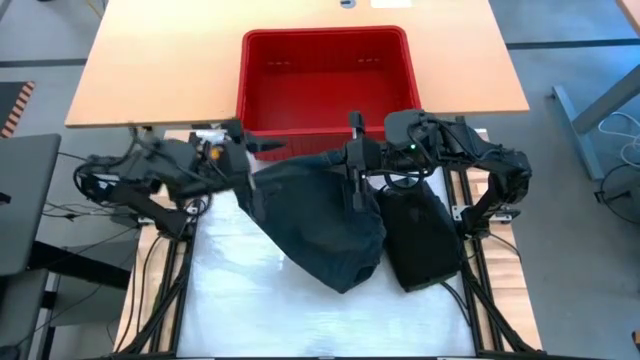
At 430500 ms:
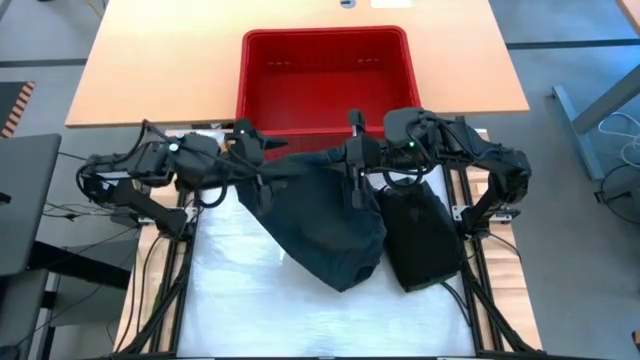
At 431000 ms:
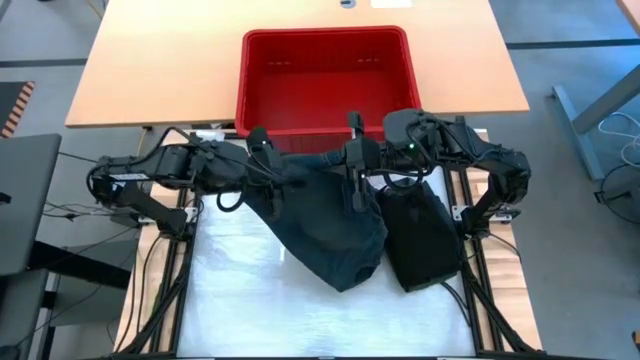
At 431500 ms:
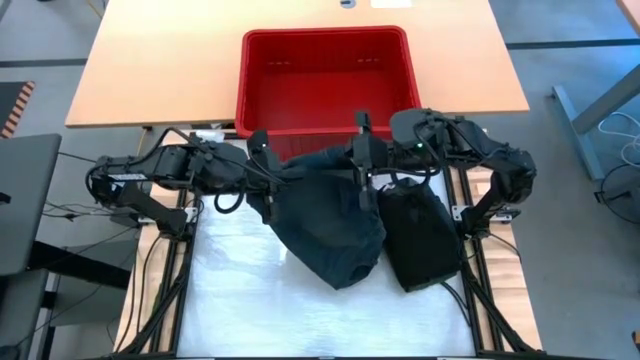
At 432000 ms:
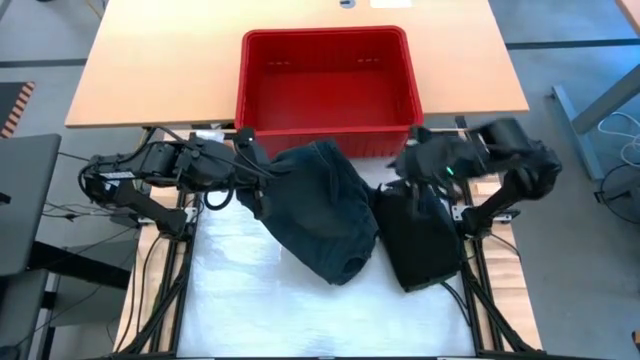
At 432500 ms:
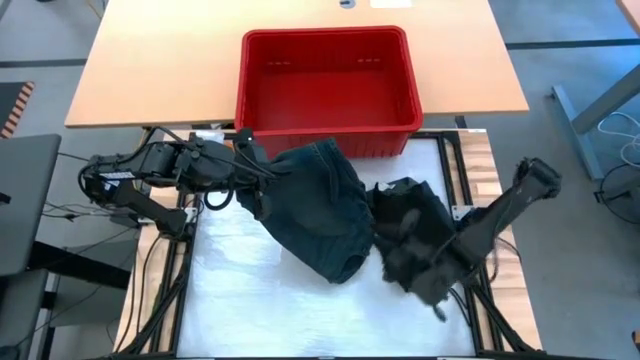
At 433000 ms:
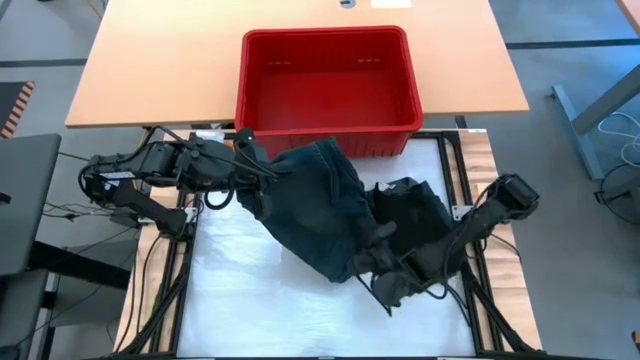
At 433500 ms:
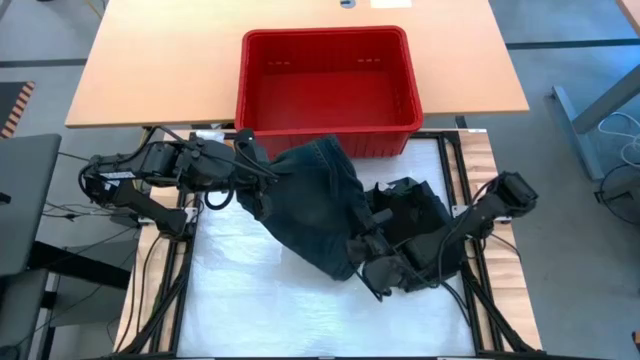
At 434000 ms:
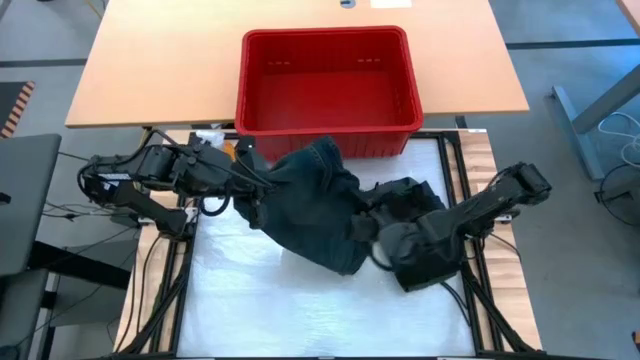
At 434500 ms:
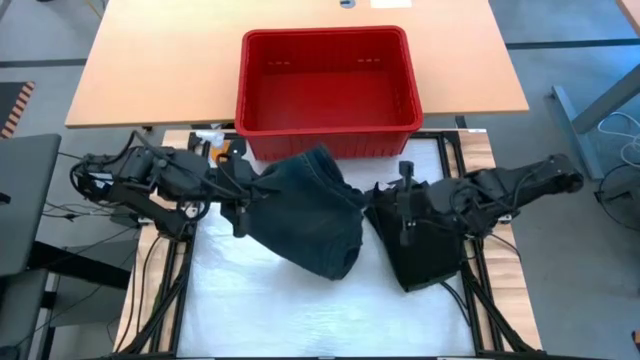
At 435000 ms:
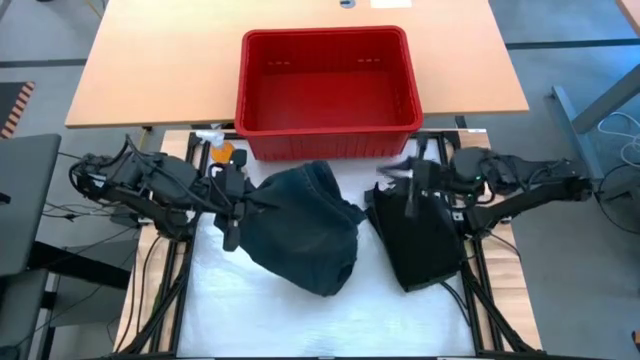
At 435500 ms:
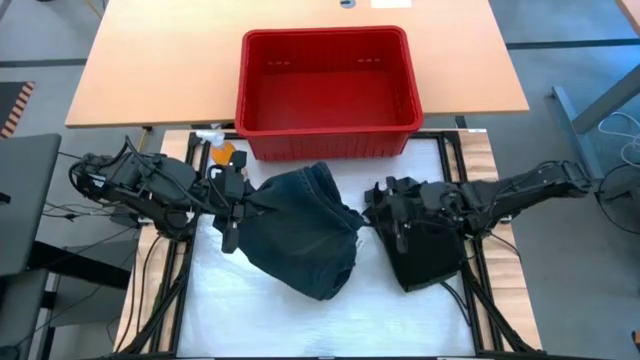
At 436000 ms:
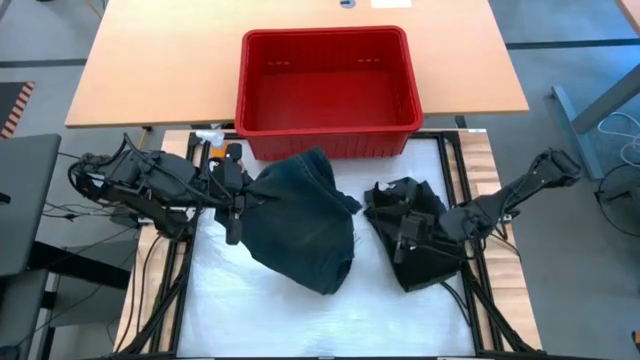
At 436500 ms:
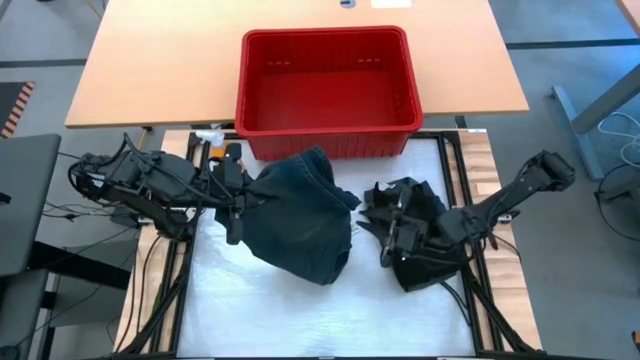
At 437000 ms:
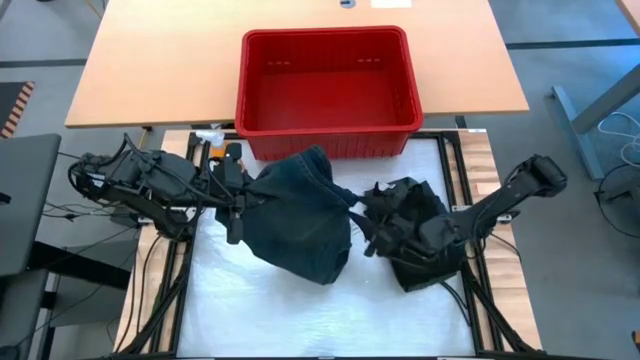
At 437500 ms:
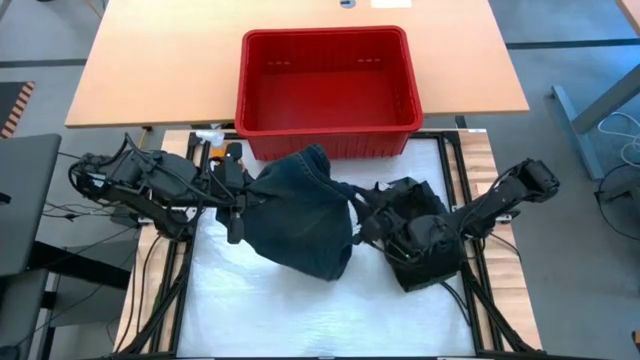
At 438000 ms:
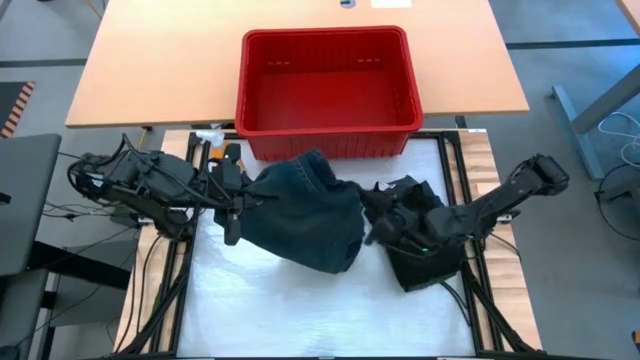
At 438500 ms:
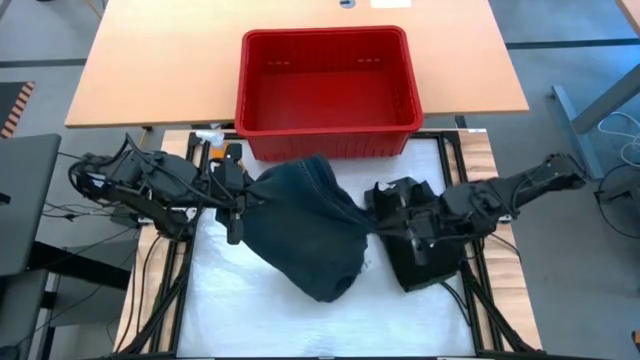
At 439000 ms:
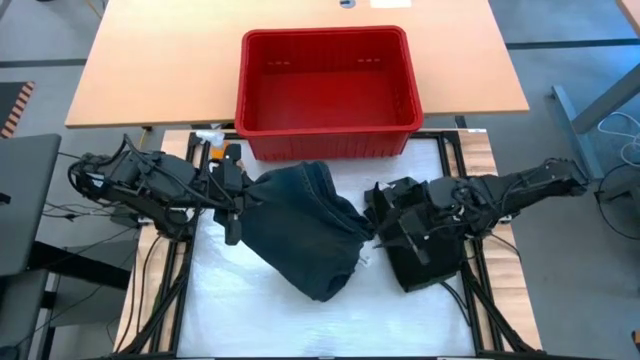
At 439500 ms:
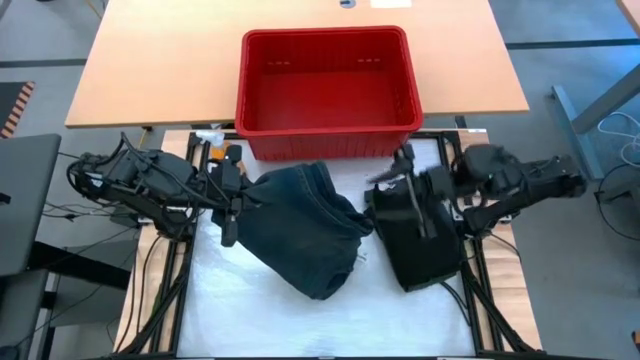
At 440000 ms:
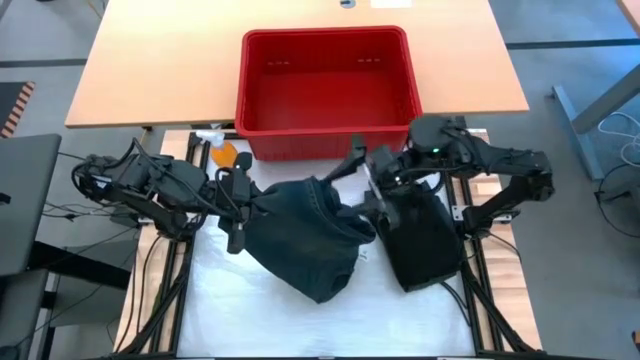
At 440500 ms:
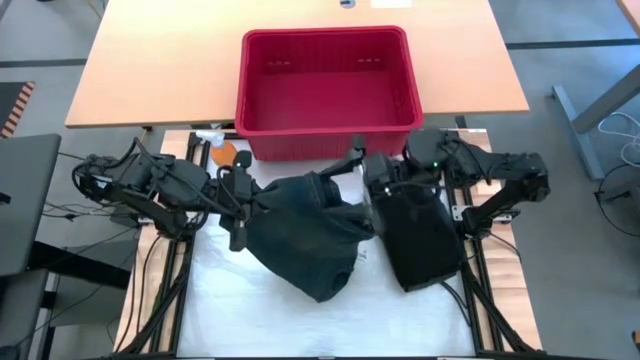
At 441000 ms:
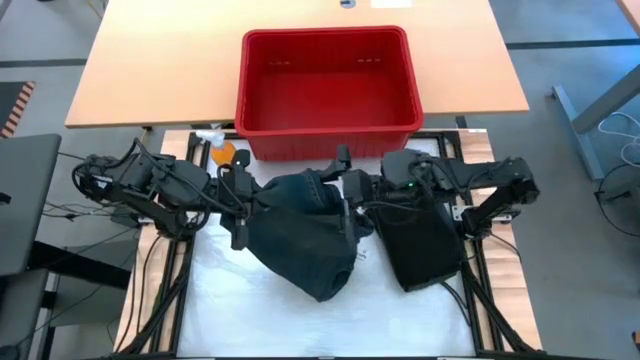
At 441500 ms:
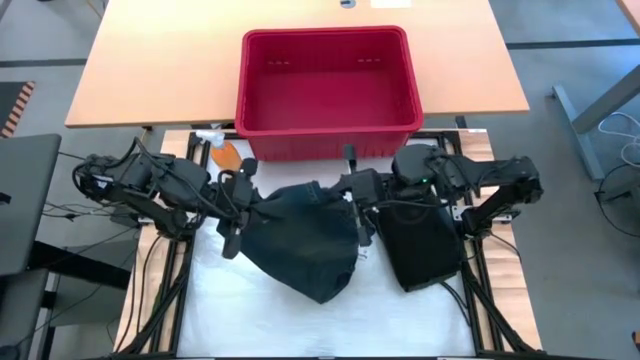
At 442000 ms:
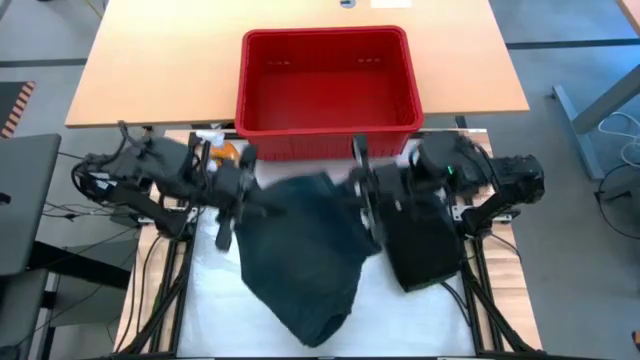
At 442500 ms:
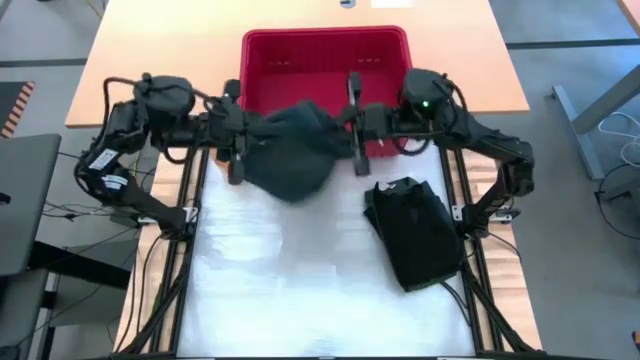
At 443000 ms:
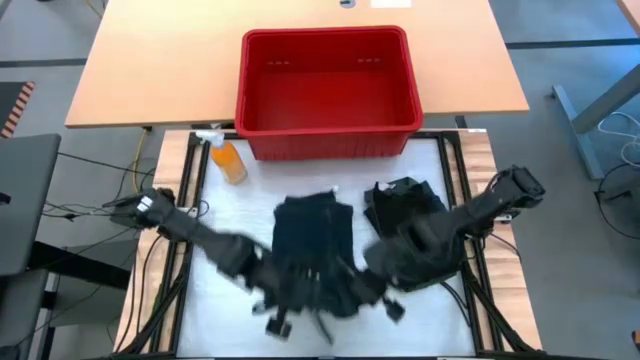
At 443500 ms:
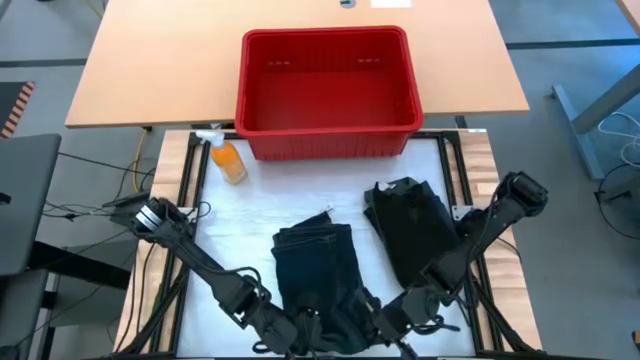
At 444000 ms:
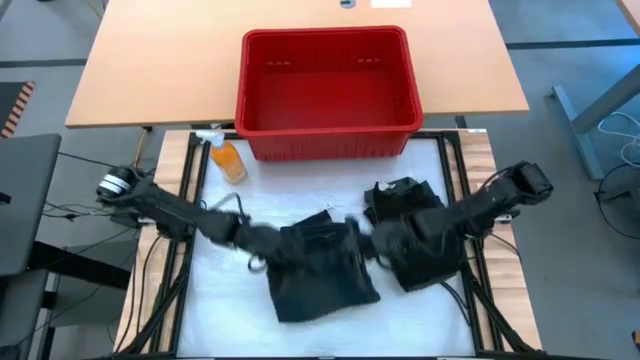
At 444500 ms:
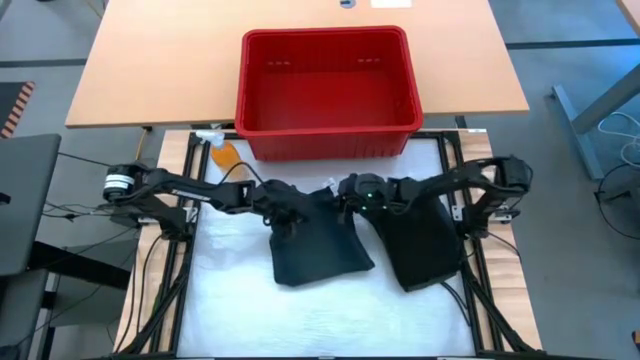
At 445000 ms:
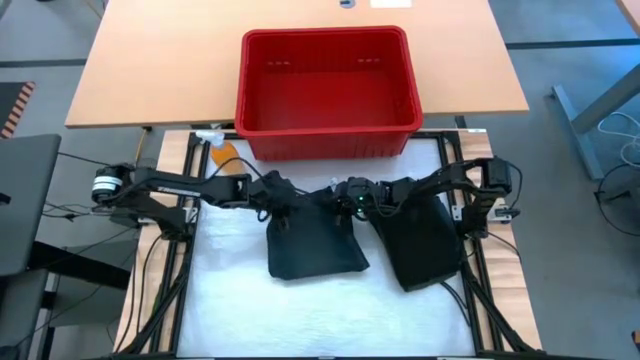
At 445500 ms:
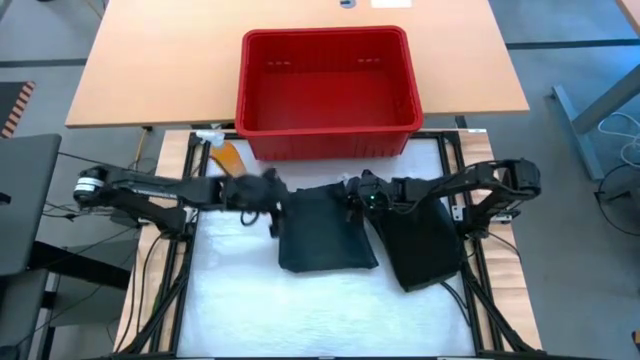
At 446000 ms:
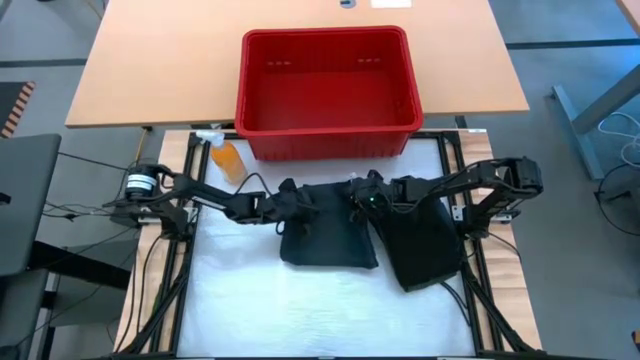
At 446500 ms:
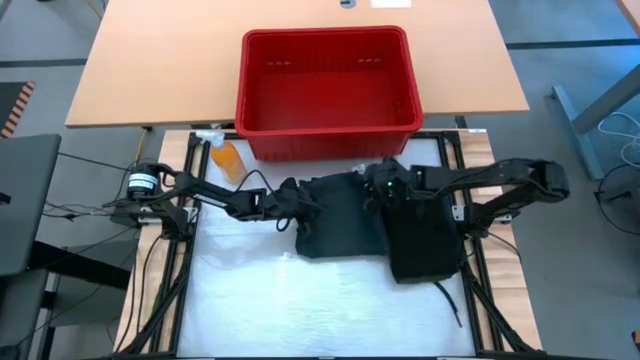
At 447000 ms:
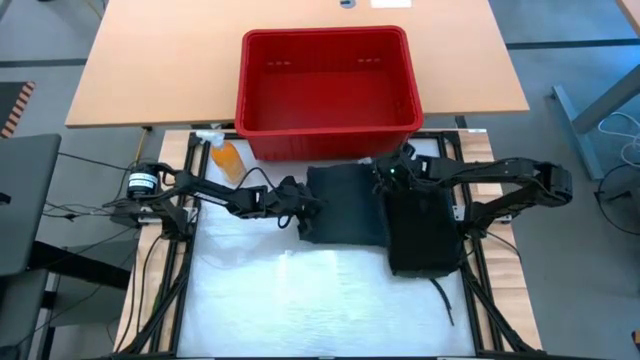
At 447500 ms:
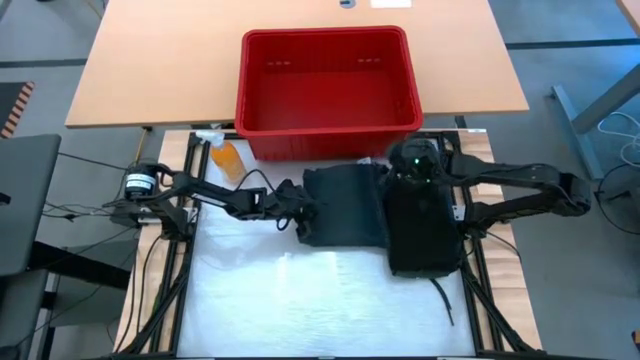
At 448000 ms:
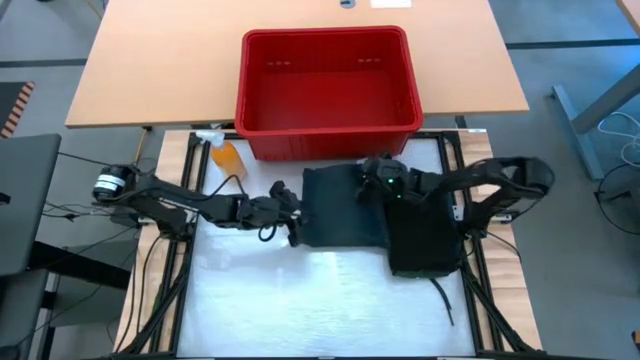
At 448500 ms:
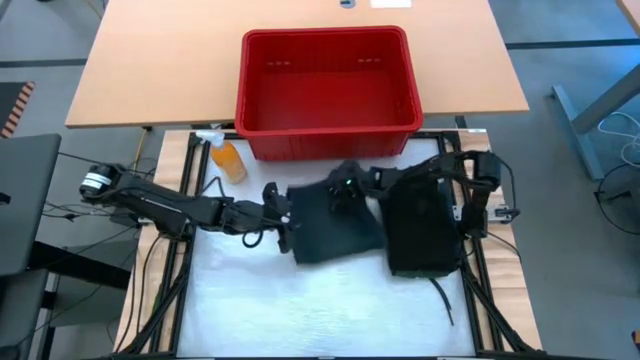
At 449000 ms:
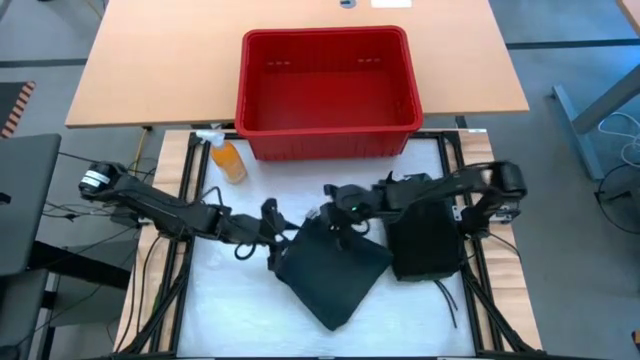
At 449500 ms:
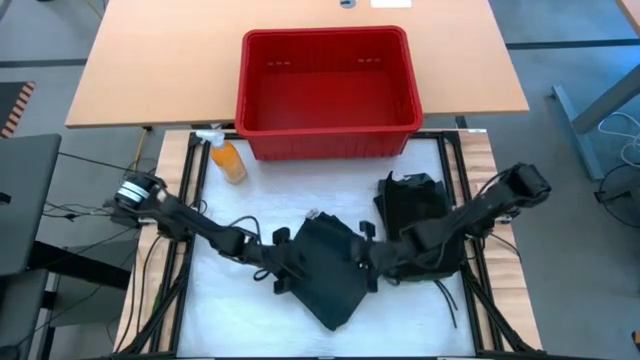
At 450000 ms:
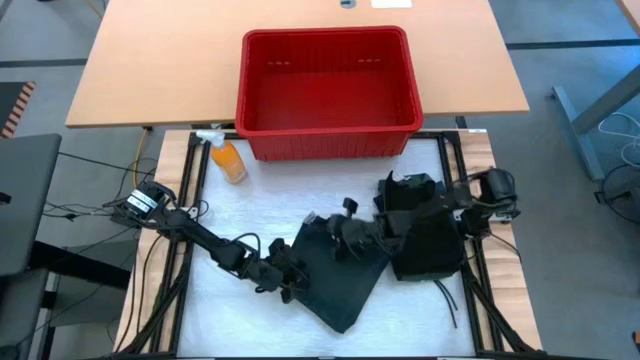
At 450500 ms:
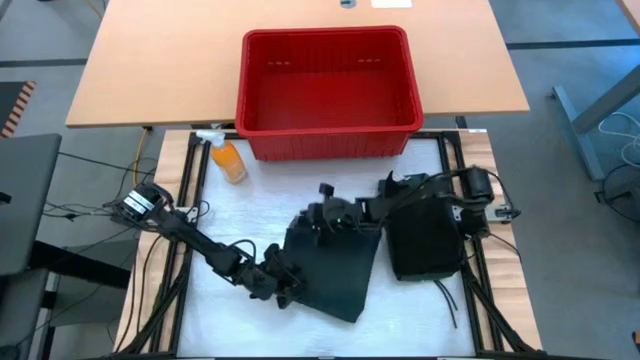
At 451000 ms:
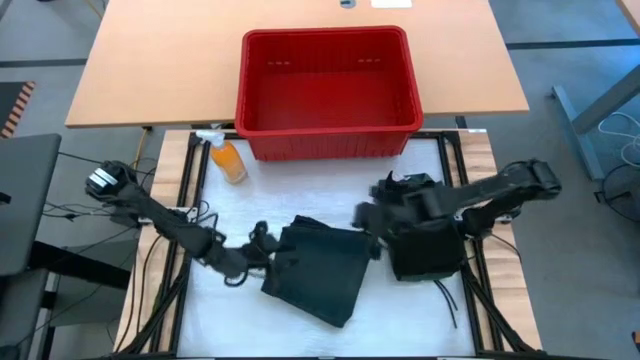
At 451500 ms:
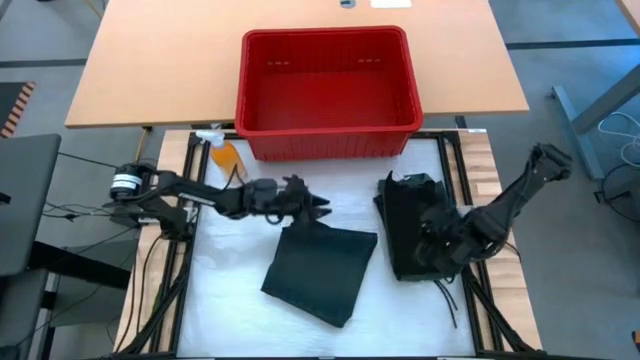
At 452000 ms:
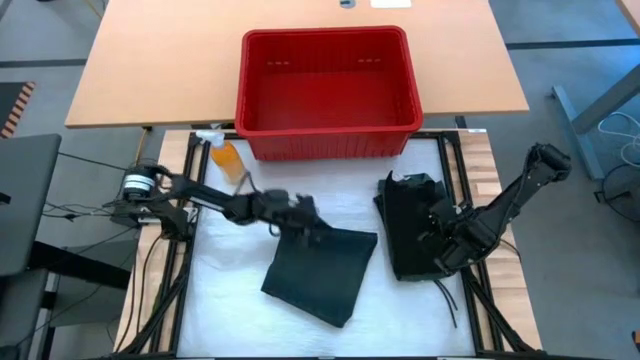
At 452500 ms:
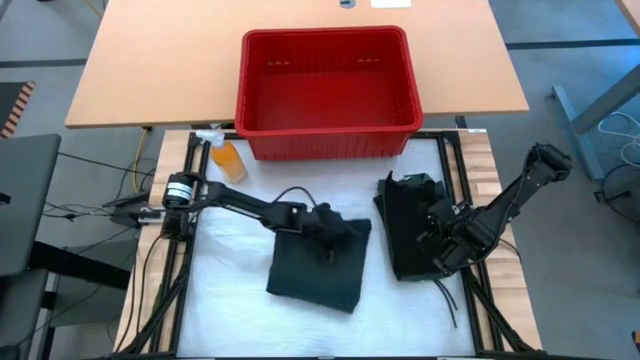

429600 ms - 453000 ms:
Task: Fold laundry
Fold the dark blue jeans
